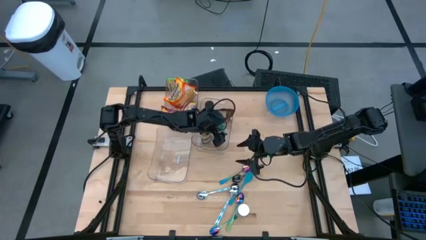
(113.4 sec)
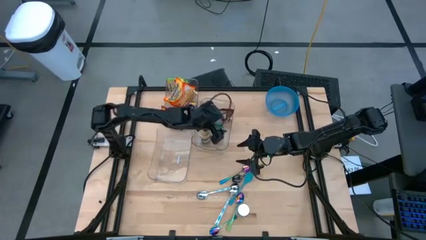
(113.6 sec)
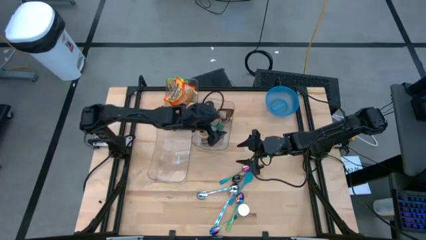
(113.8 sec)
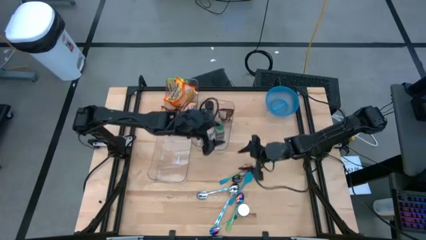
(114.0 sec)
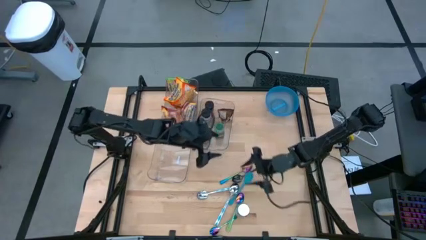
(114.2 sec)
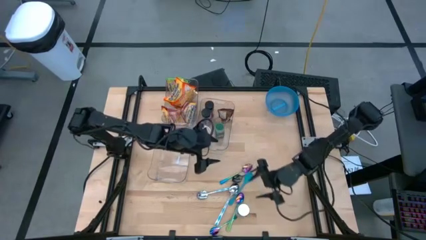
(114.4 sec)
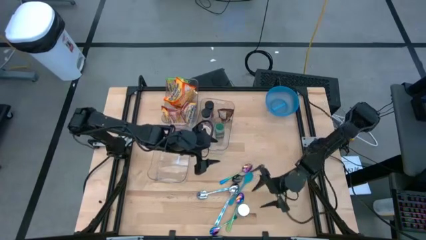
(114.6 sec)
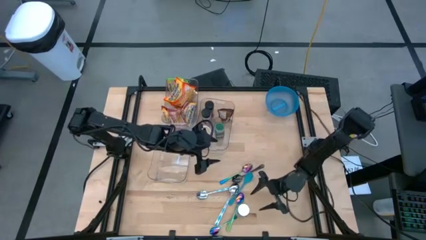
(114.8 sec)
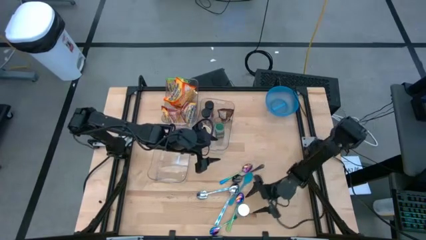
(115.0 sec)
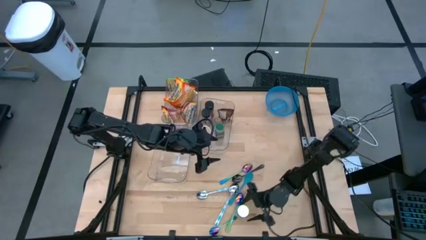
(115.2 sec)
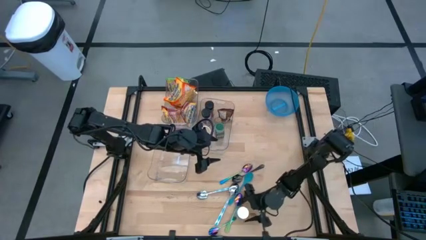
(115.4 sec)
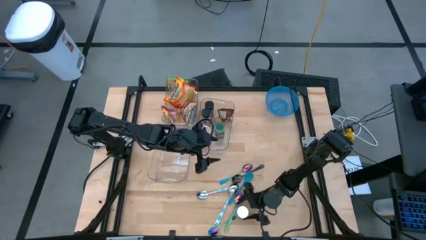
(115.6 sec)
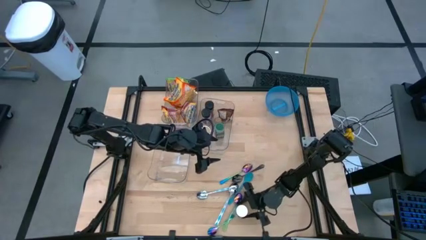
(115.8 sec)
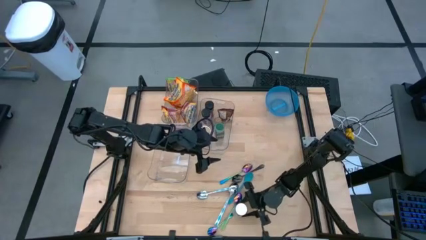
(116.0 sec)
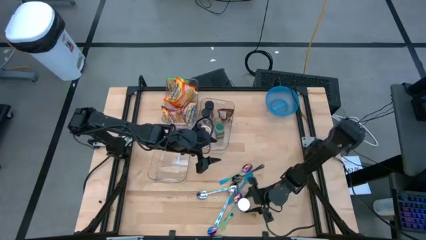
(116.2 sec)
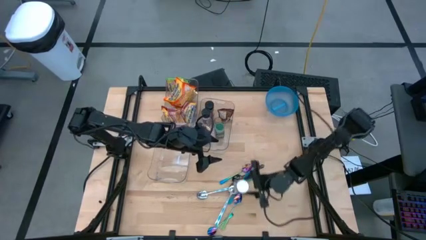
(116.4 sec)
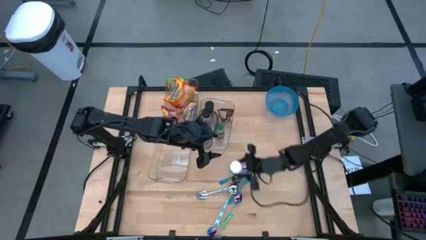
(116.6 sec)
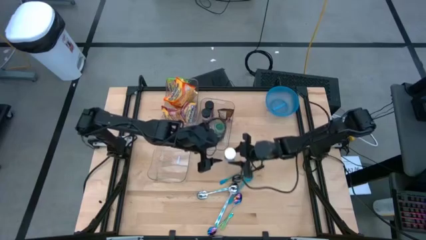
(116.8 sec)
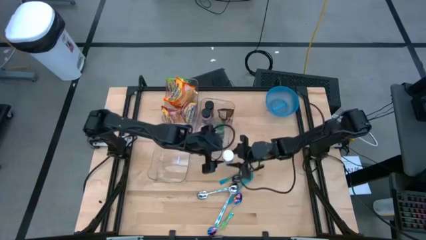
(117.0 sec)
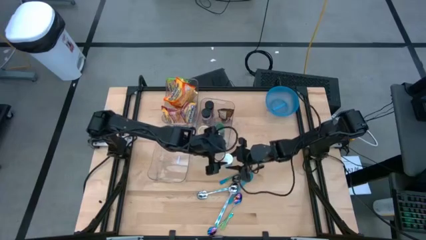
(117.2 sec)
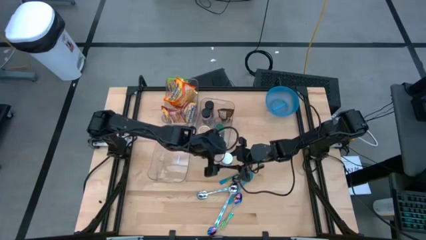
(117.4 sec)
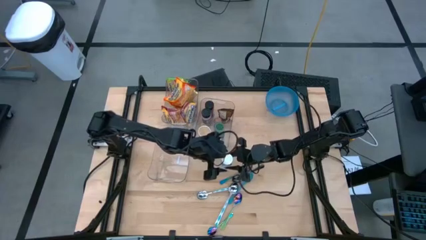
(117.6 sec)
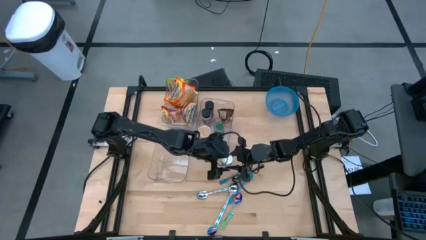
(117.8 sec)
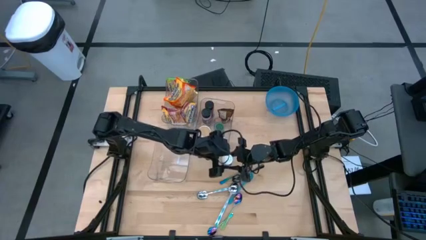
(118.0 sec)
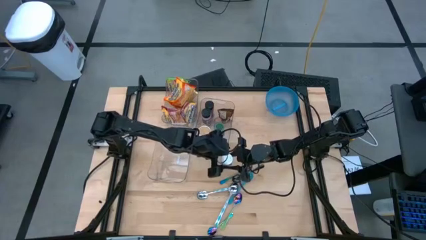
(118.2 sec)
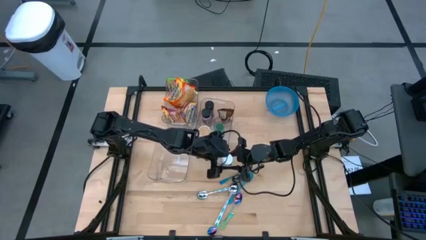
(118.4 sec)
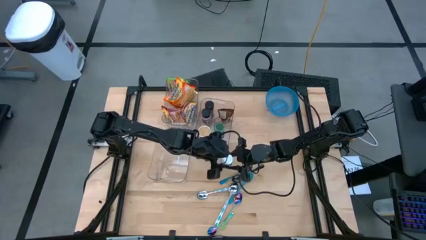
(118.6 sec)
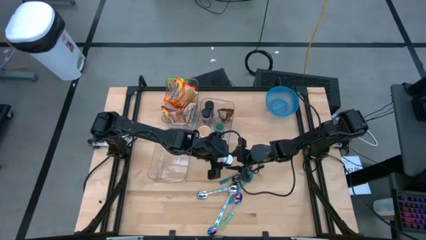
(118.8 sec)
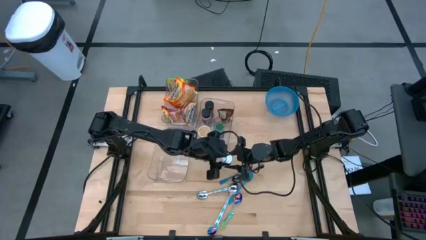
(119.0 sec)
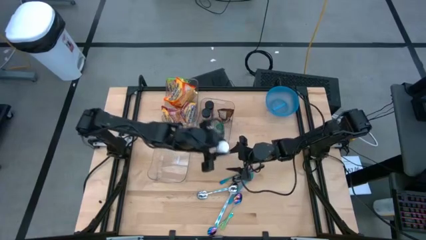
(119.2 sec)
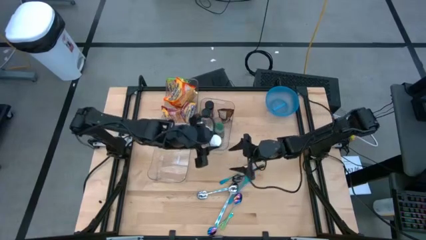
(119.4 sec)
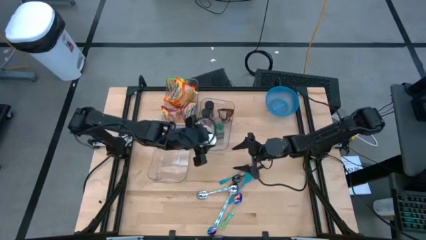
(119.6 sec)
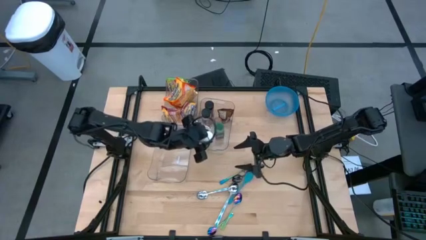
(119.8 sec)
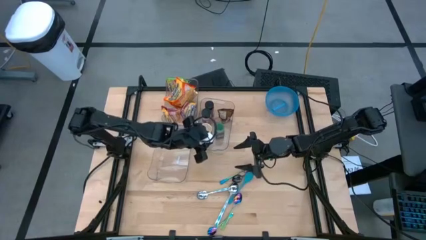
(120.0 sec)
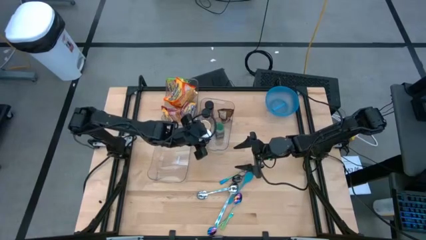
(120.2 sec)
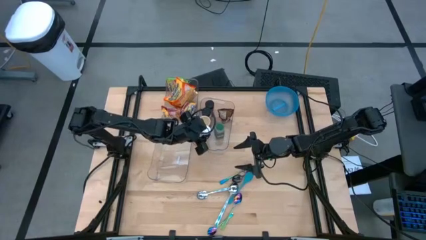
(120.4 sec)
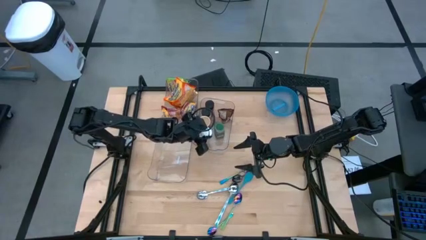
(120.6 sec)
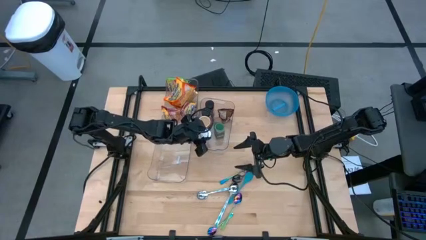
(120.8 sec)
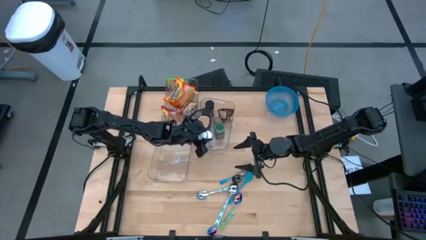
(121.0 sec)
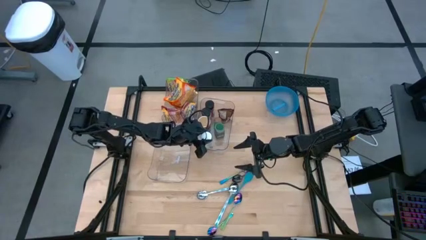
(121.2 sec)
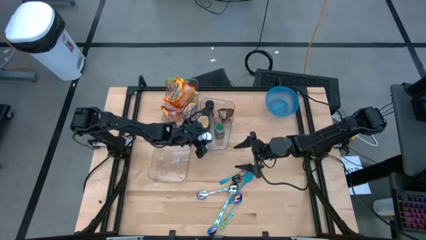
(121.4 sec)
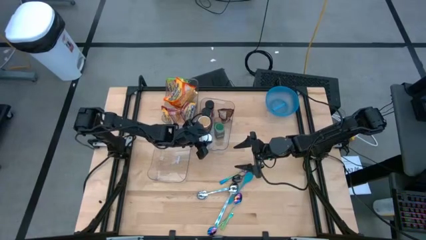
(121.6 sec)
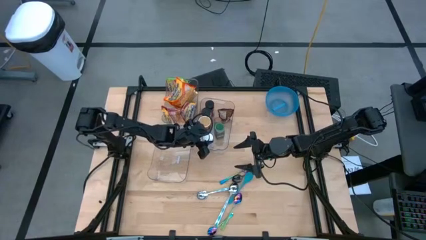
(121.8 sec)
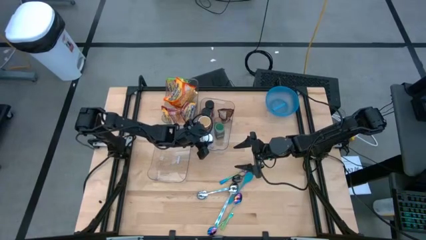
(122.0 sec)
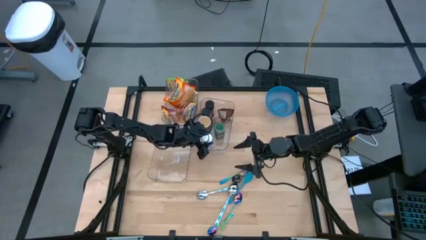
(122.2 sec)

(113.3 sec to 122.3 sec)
Task: Pick & Place Food Item
Put the white spice bottle into the middle transparent bin

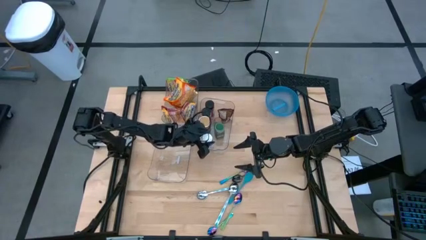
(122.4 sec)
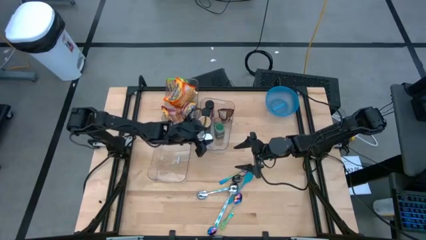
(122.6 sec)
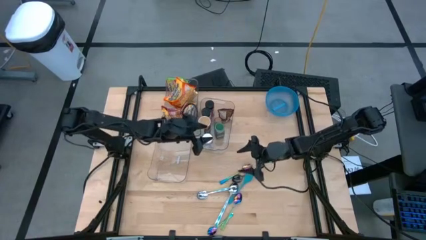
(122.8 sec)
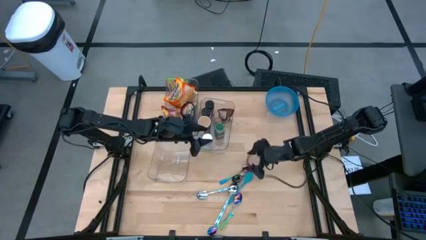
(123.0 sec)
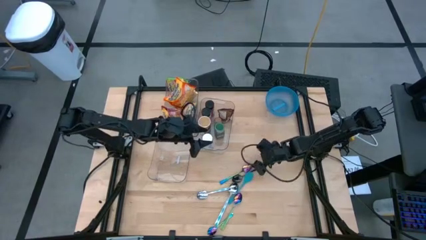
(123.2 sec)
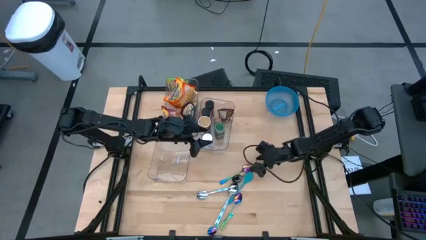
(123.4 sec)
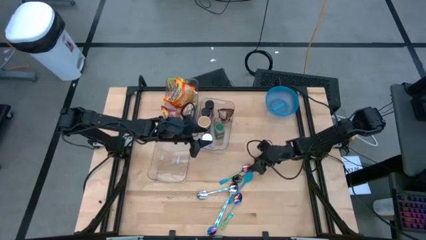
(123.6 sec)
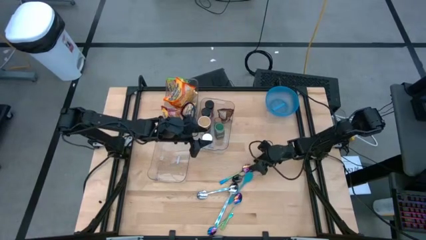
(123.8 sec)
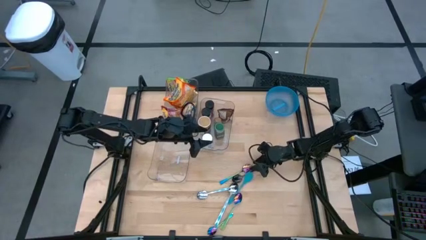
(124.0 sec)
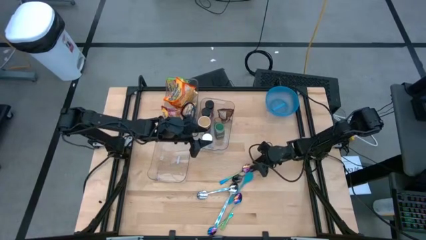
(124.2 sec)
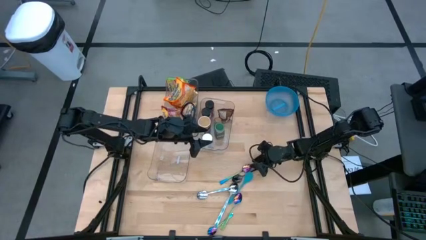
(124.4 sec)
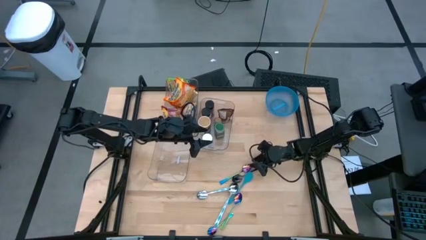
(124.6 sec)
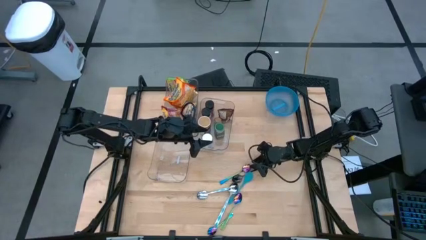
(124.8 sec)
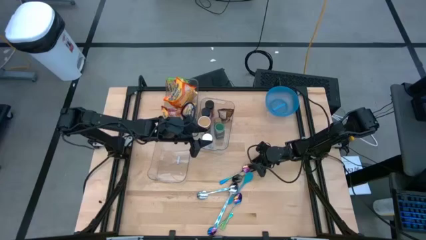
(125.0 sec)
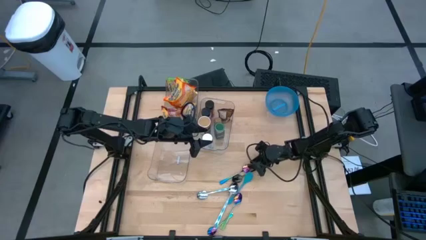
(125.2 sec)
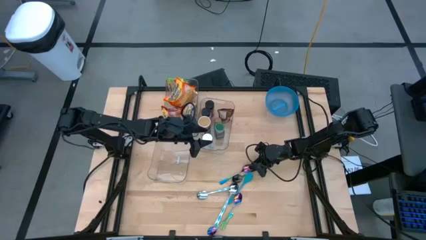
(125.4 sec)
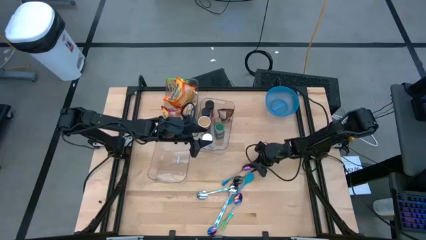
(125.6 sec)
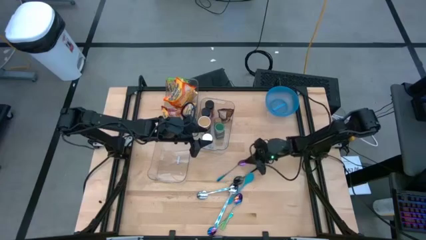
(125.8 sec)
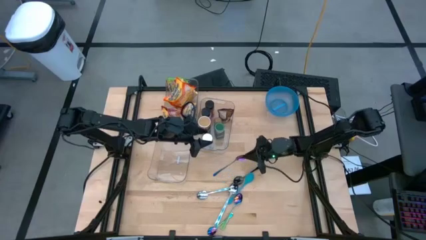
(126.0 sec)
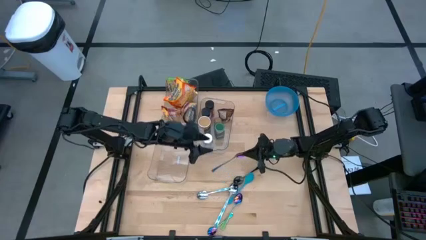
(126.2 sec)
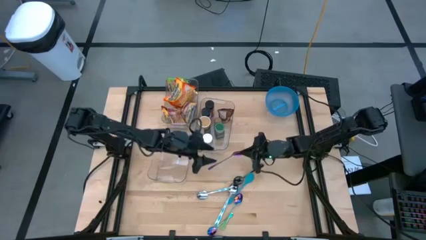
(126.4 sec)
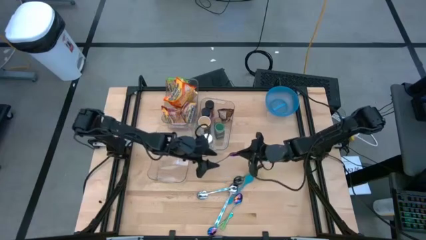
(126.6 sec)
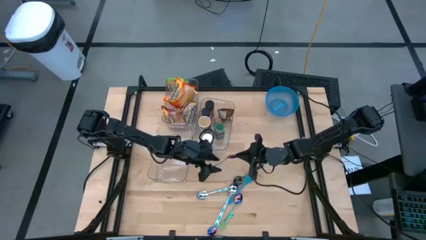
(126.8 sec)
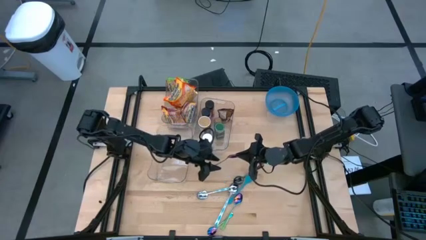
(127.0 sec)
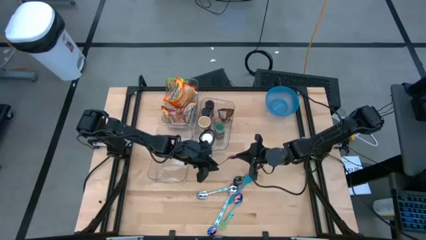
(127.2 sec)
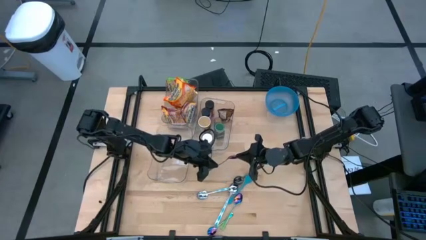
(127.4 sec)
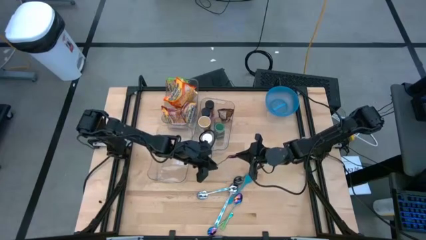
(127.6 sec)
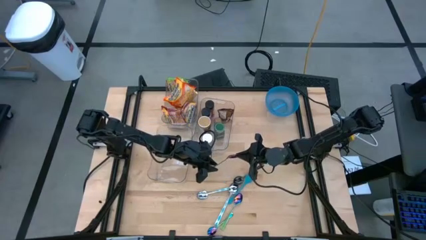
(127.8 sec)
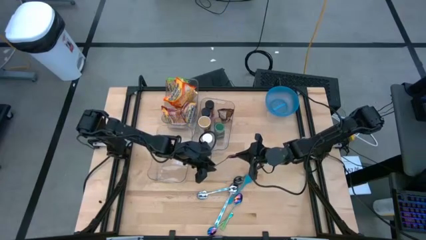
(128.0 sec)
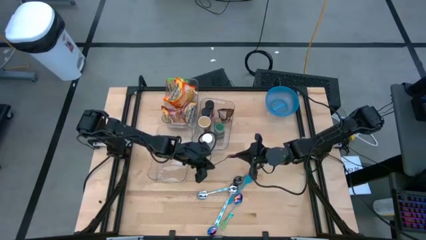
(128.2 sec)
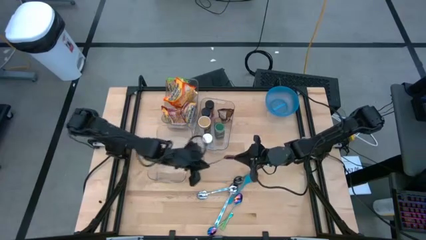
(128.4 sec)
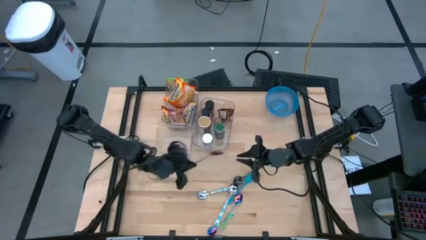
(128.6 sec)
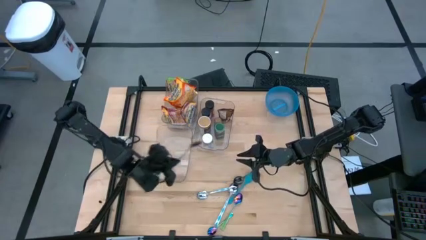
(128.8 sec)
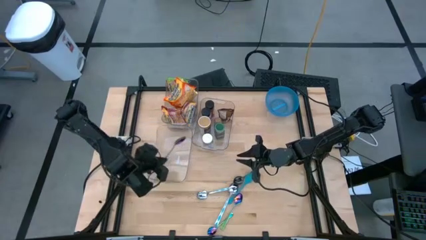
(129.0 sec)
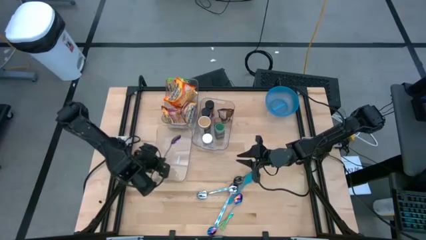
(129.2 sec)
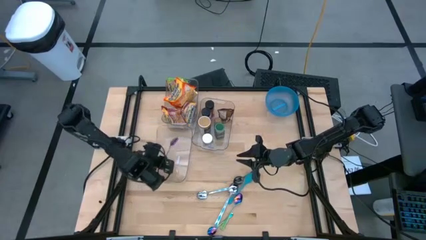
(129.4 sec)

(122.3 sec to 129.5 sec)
Put the top purple spoon into the bottom transparent bin
